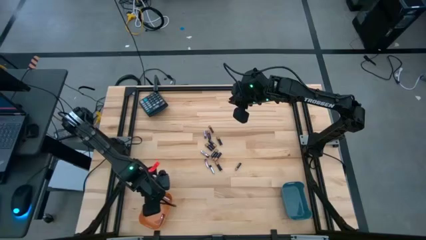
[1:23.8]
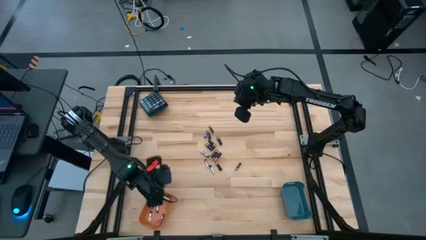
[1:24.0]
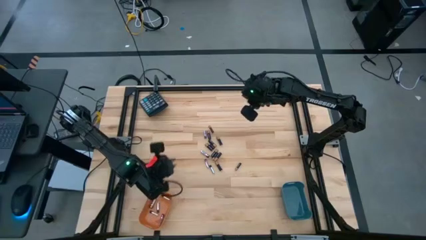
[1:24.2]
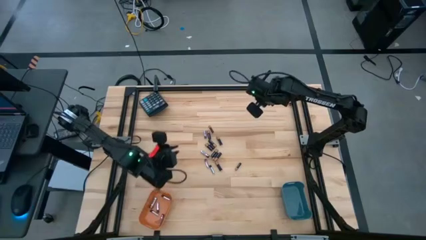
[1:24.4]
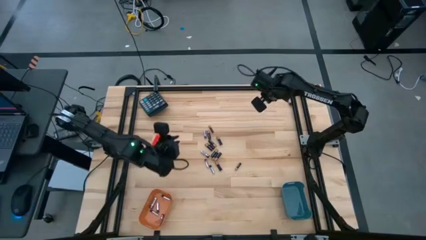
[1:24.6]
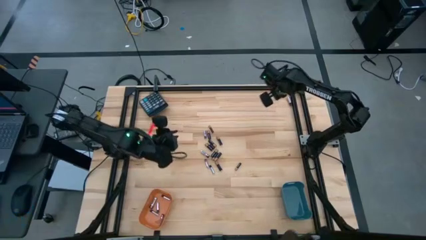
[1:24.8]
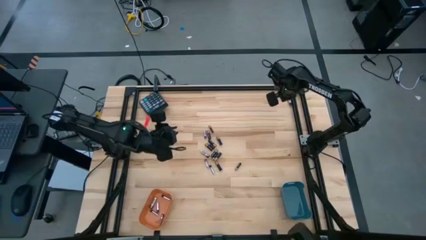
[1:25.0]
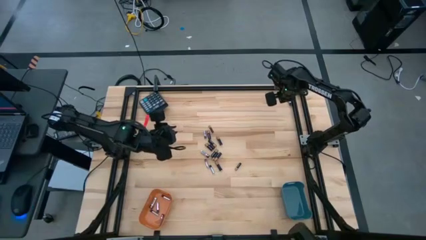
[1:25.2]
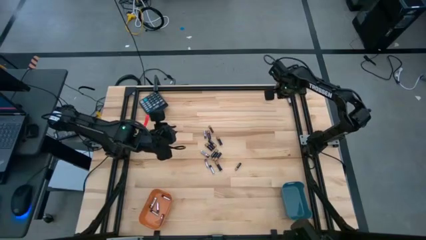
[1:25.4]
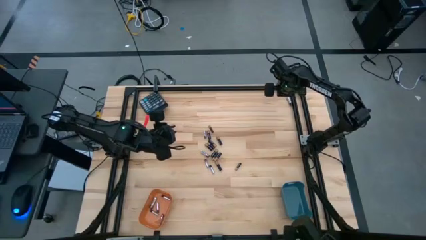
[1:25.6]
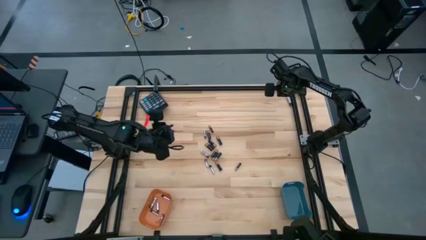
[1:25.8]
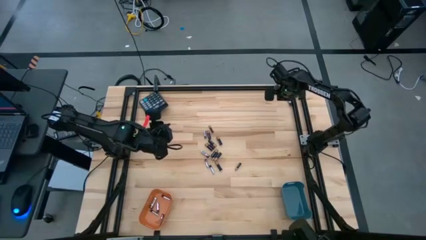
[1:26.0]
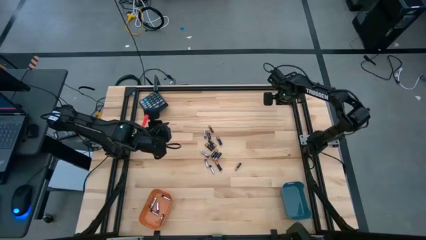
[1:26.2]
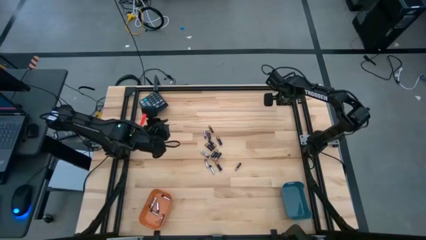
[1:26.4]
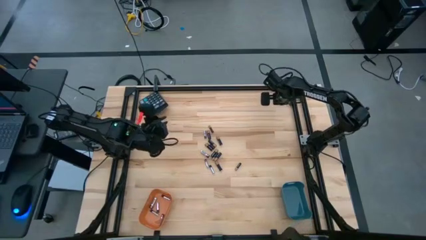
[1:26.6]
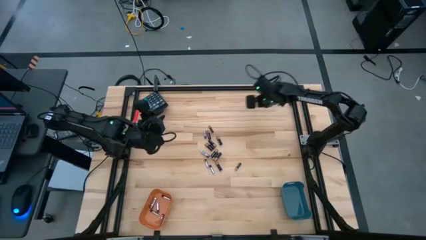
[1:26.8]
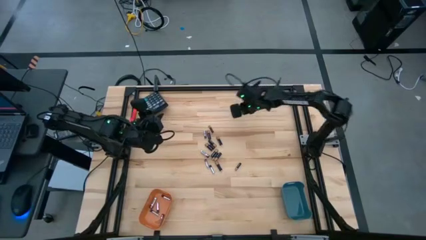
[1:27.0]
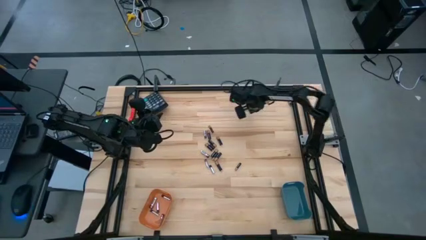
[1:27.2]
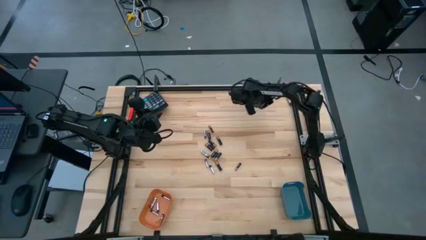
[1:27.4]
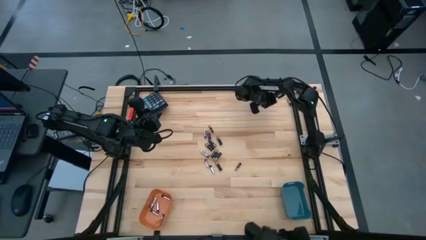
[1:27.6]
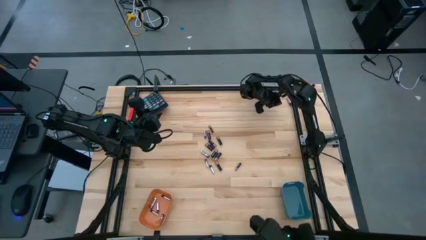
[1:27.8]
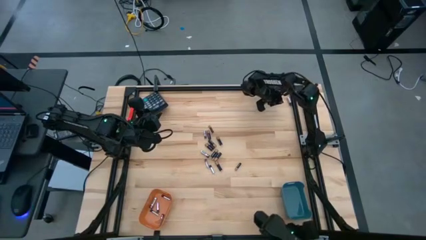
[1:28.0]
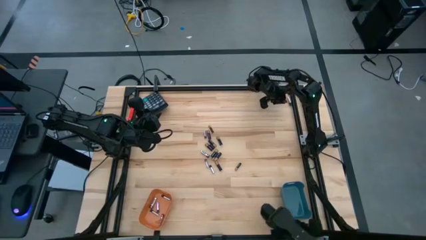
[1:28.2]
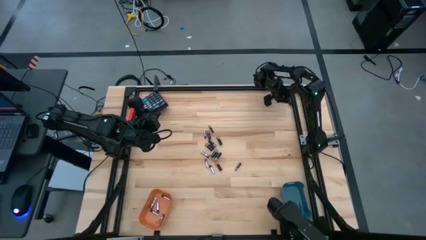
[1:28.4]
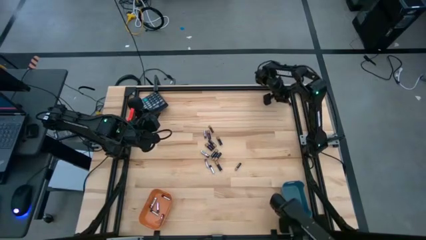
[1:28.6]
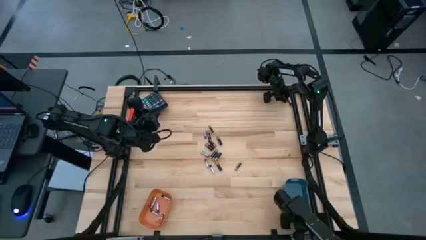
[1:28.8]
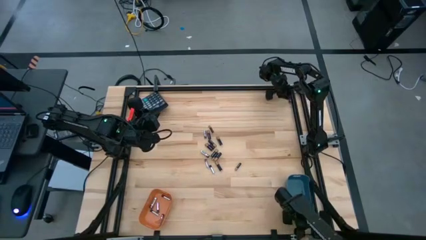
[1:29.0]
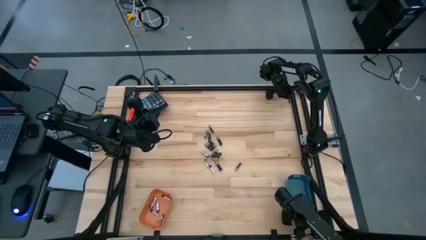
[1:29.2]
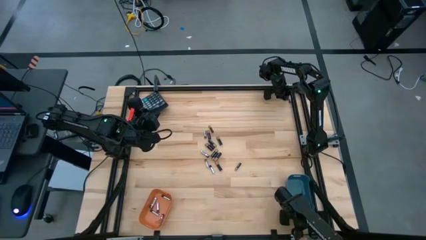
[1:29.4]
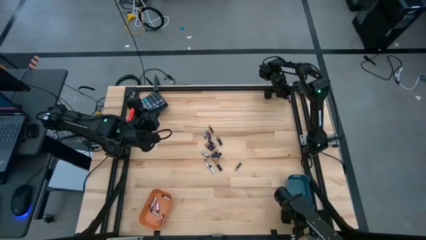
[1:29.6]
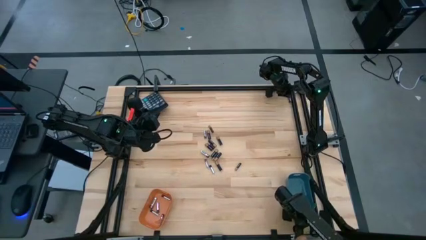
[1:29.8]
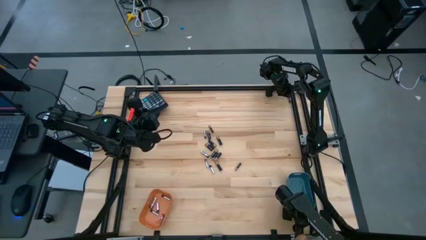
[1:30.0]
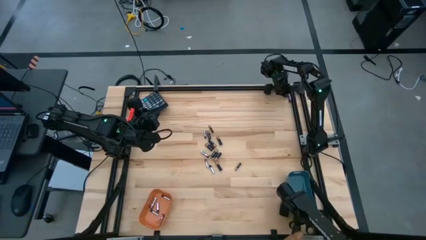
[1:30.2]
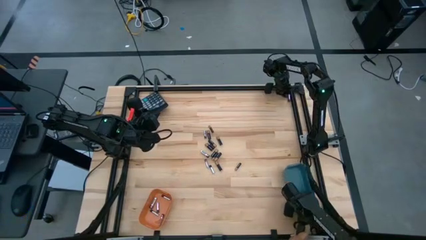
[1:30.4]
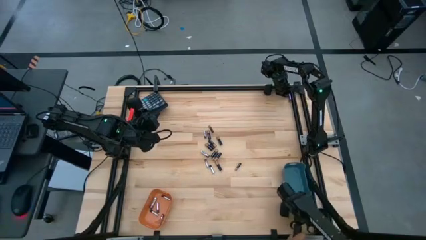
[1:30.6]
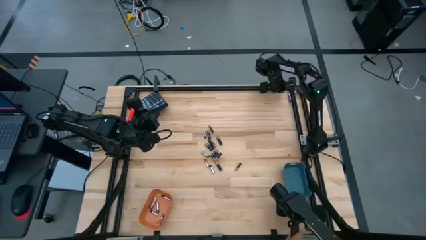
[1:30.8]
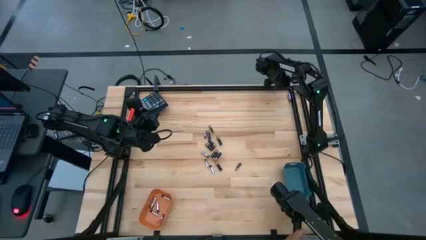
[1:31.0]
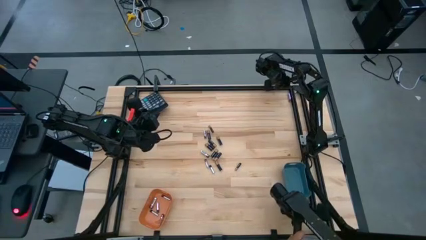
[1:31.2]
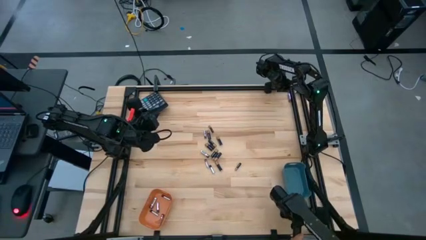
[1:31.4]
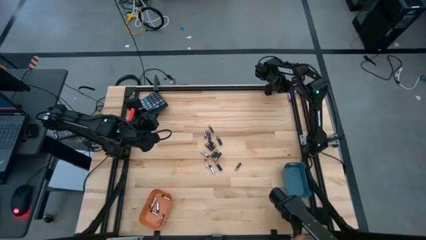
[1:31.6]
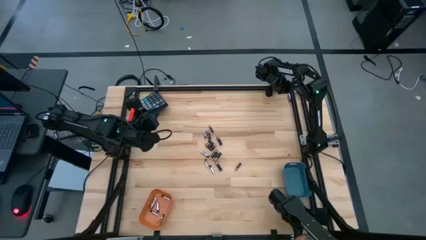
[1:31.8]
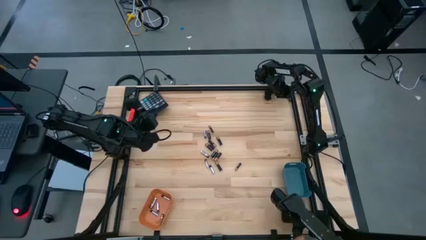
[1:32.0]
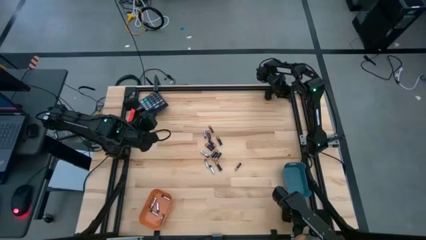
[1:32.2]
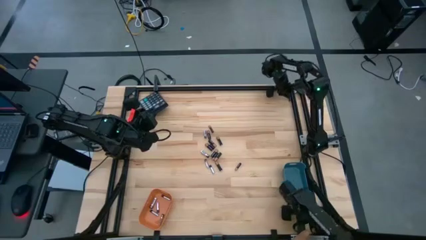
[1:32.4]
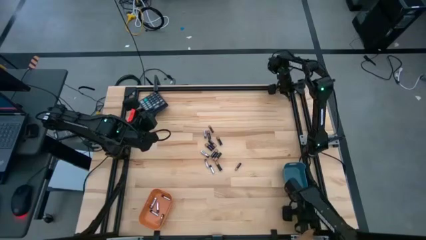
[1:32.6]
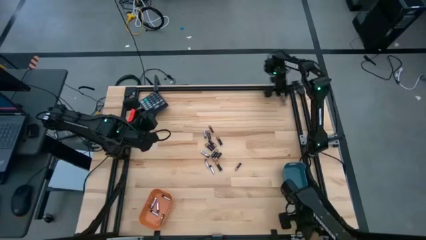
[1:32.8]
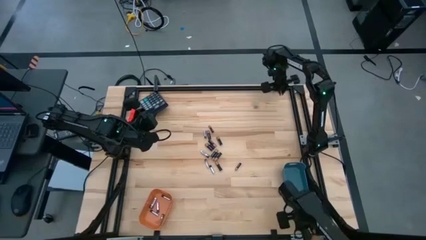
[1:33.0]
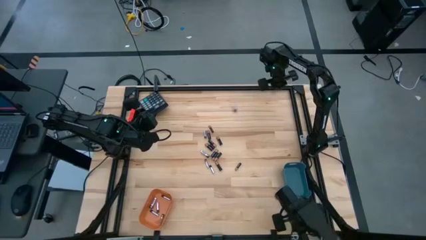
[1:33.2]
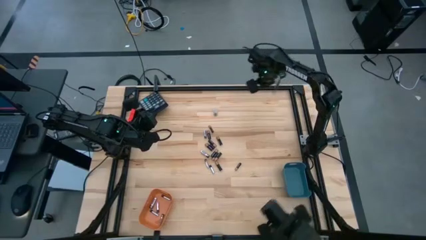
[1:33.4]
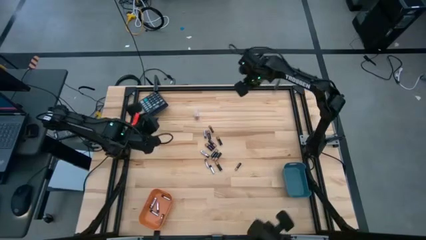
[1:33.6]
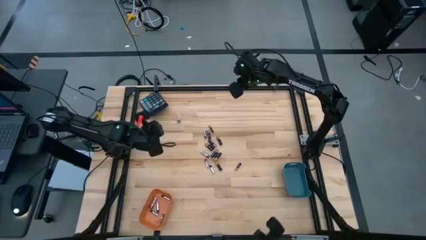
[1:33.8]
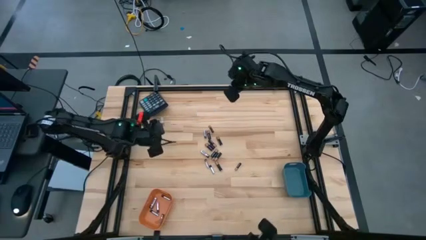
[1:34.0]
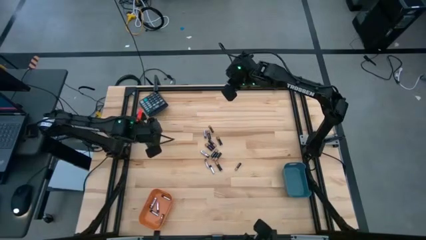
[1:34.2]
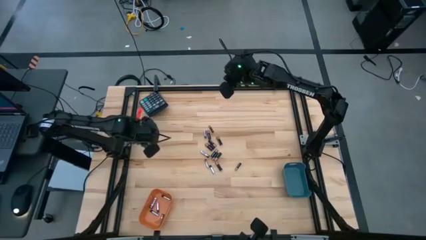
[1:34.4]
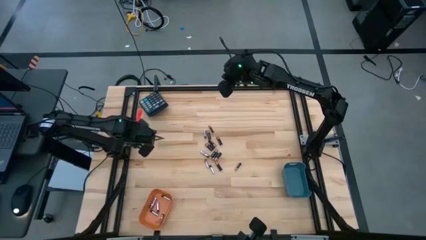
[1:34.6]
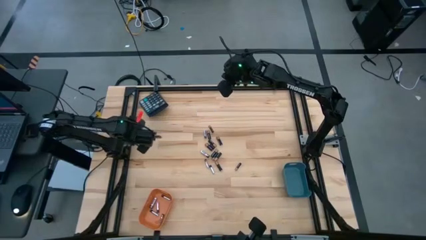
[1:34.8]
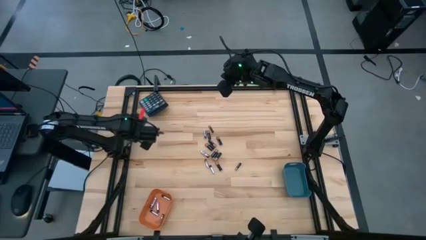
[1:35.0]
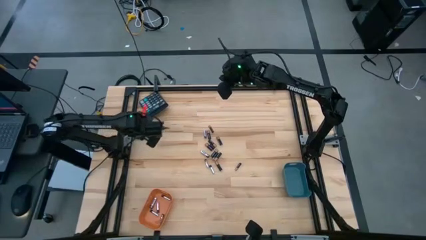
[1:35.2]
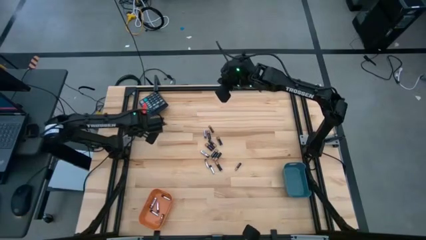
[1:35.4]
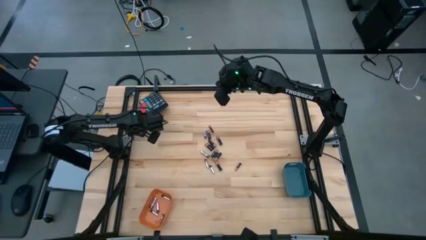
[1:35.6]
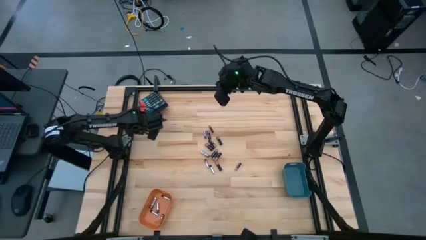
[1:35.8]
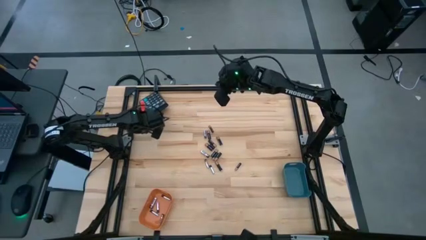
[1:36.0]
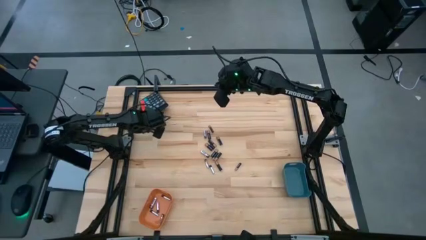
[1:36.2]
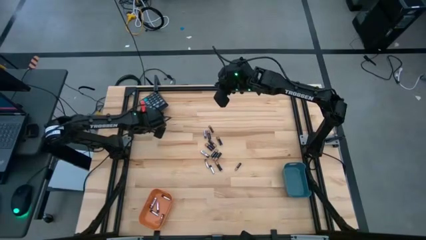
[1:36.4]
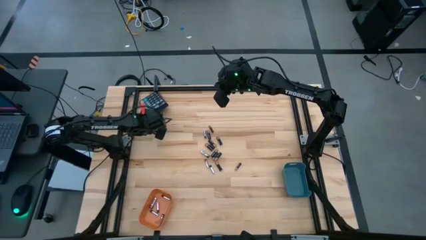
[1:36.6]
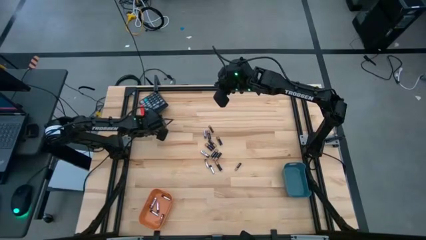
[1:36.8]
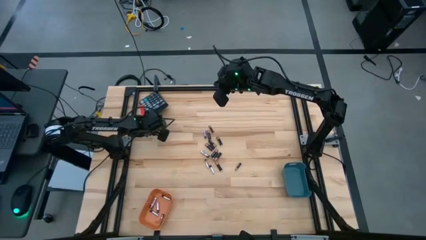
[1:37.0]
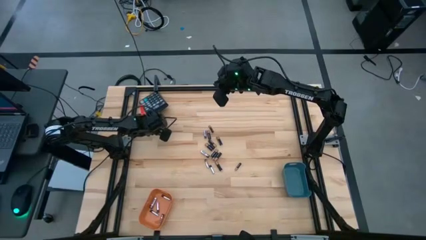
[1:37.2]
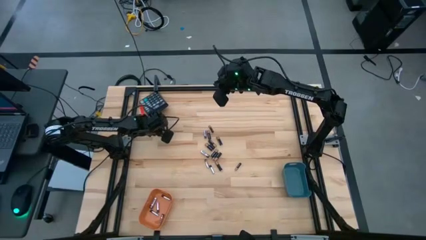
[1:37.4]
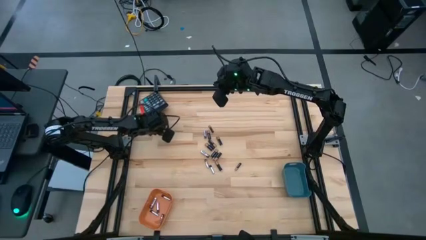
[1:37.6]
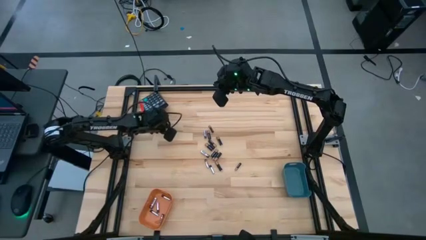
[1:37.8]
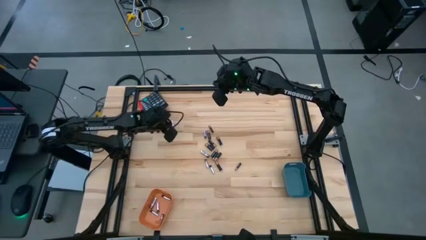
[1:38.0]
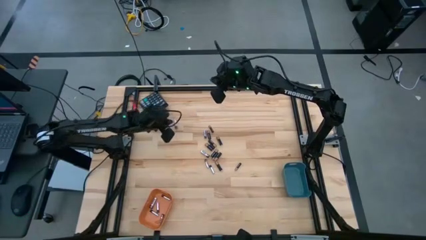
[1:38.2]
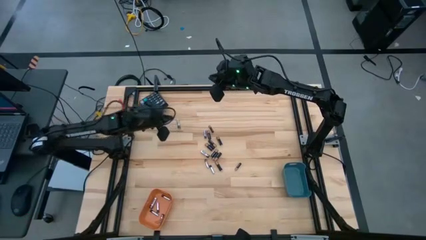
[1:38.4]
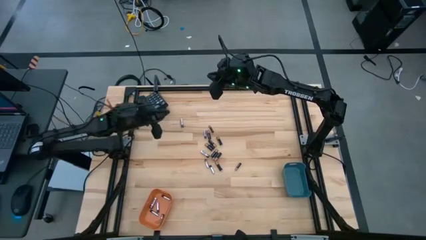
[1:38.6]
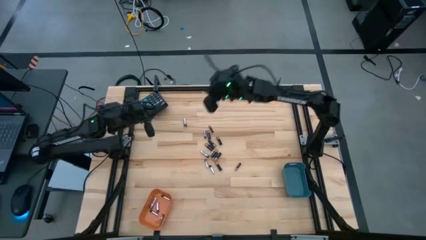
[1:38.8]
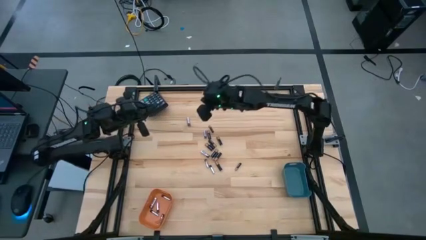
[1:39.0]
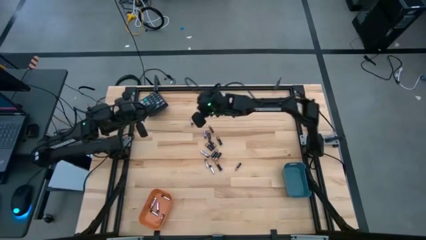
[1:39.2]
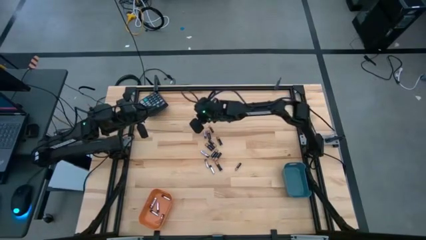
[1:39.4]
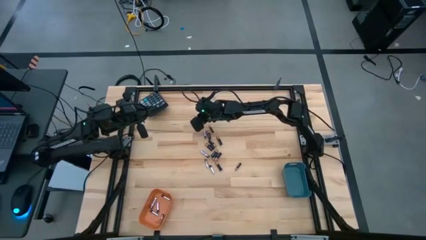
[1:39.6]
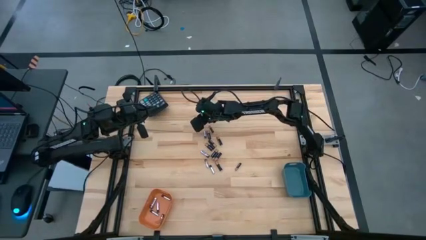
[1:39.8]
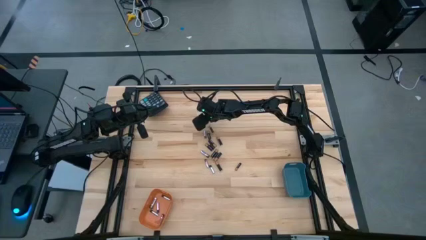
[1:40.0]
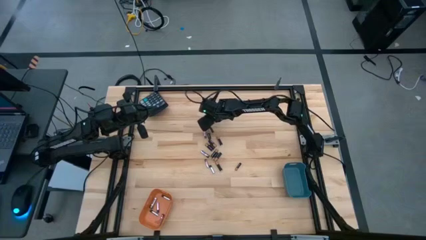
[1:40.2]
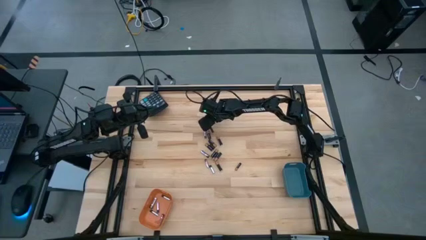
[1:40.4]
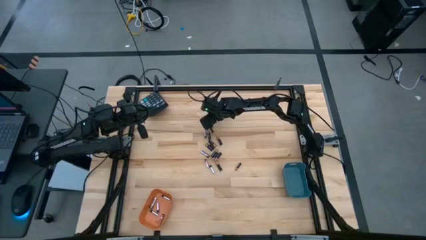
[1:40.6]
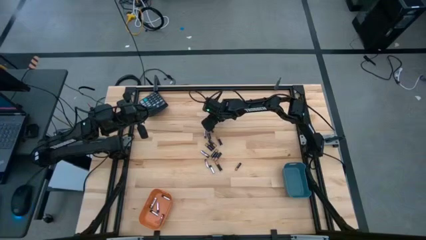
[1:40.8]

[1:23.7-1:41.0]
Task: Sort batteries
Put the silver battery into the orange bin

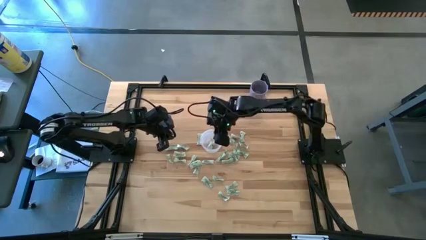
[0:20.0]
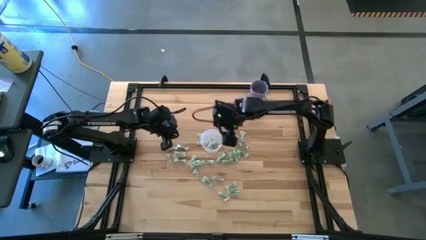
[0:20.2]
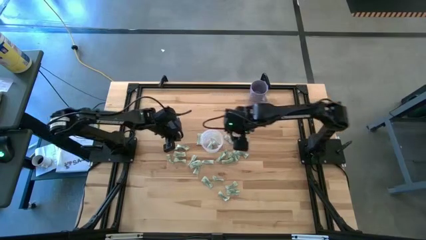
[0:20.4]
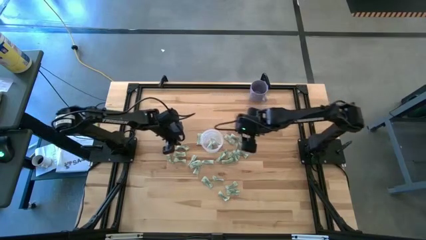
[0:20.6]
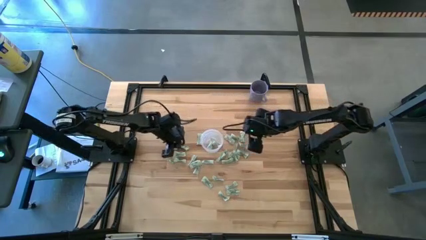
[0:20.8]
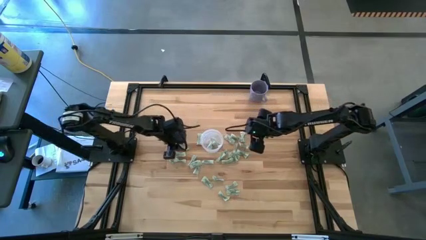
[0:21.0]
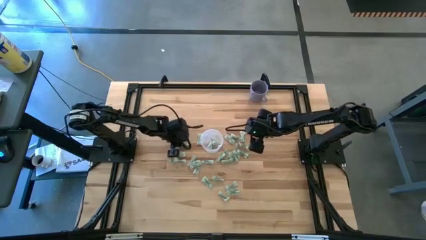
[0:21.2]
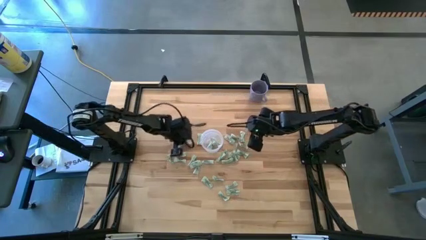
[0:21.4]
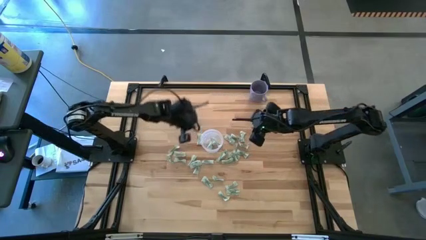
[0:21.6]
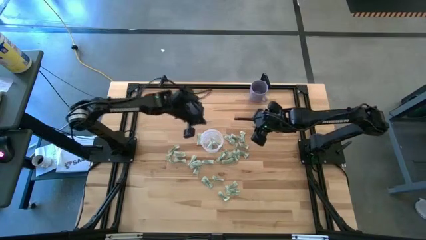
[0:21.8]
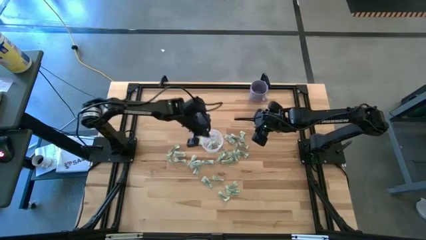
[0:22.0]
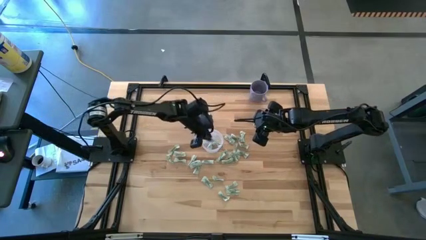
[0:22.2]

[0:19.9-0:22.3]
Task: Pick and place Stevia / Truvia into bins
Put the white stevia packet into the transparent container
